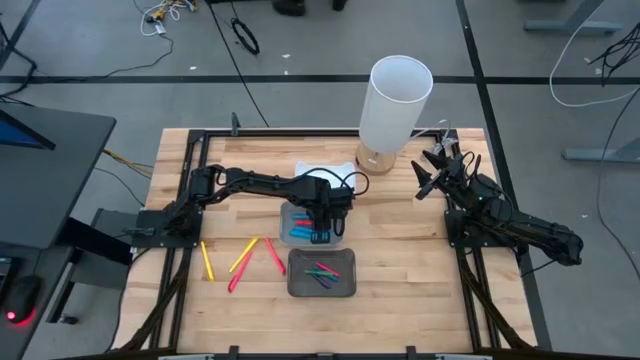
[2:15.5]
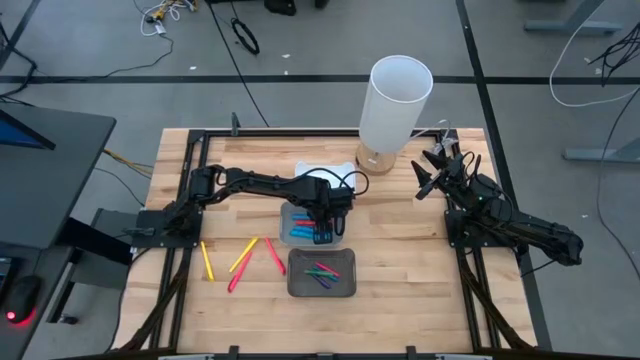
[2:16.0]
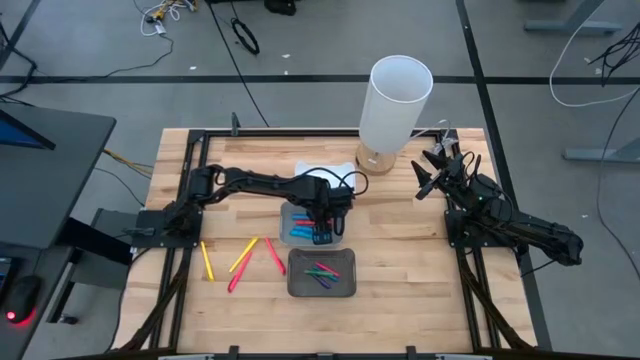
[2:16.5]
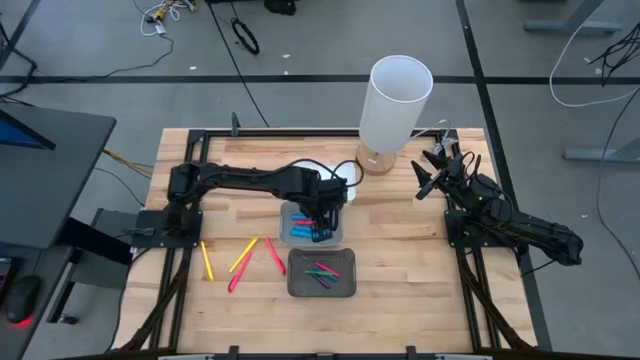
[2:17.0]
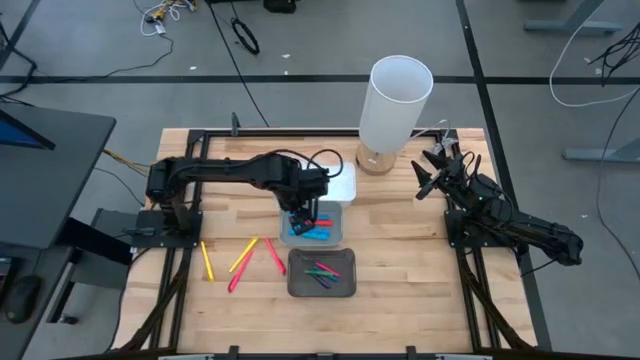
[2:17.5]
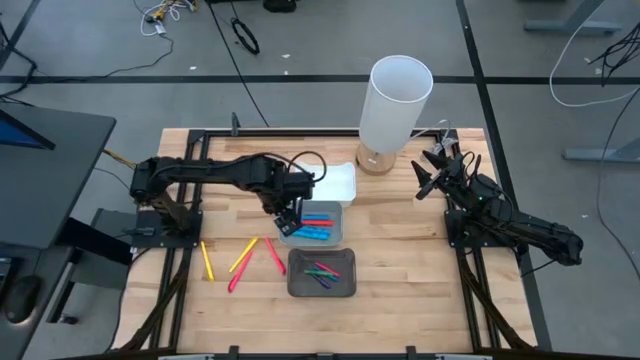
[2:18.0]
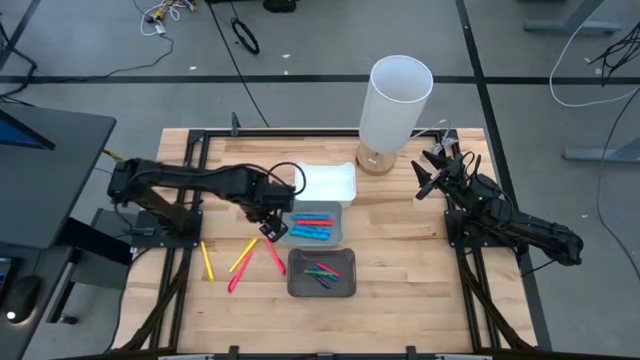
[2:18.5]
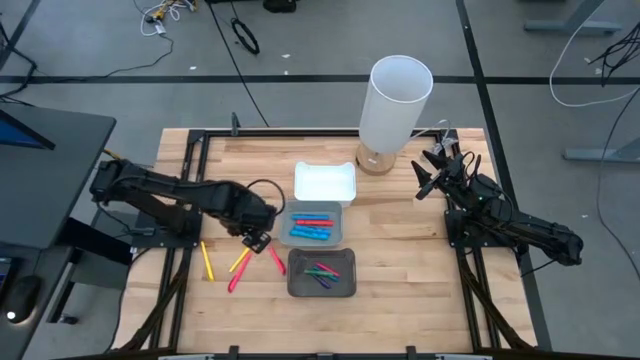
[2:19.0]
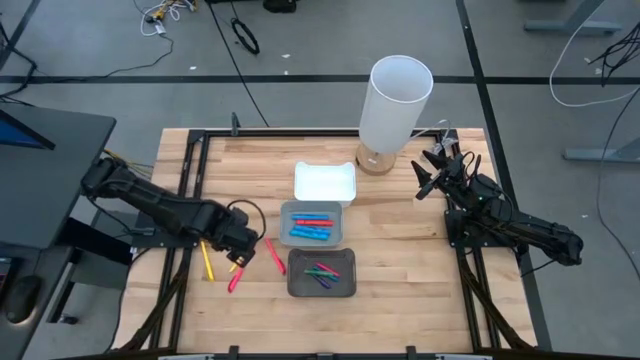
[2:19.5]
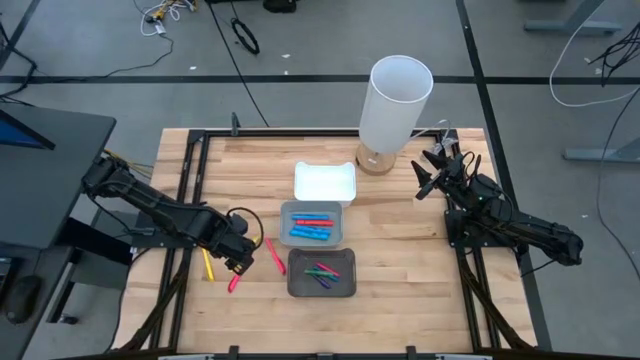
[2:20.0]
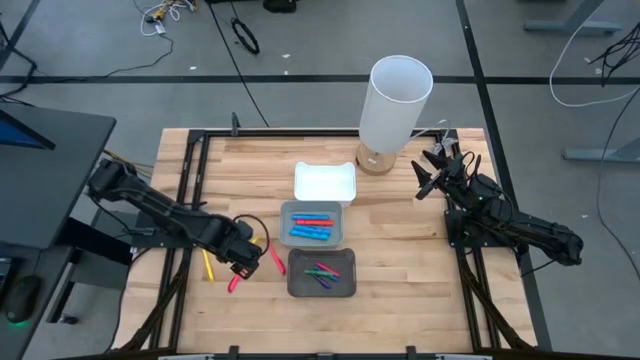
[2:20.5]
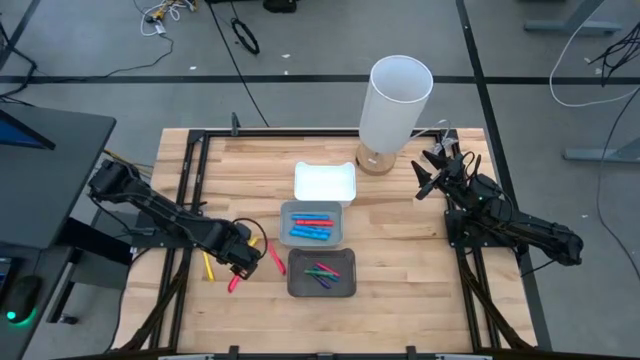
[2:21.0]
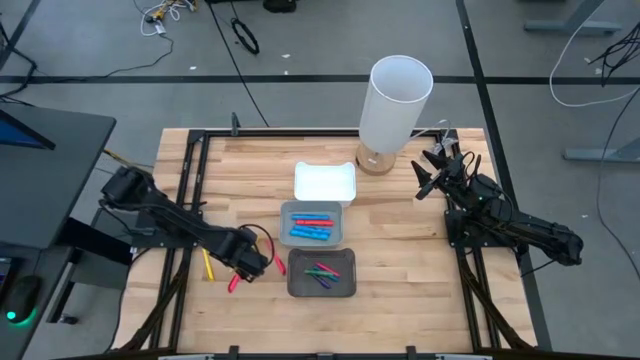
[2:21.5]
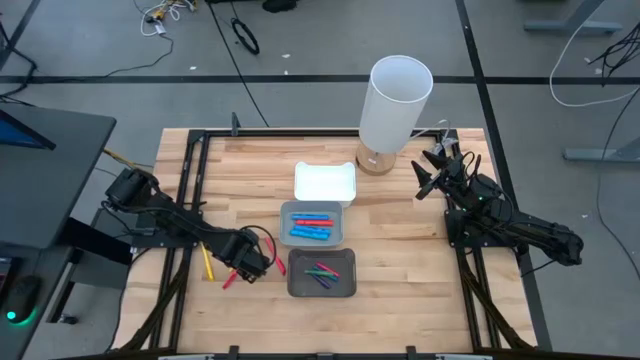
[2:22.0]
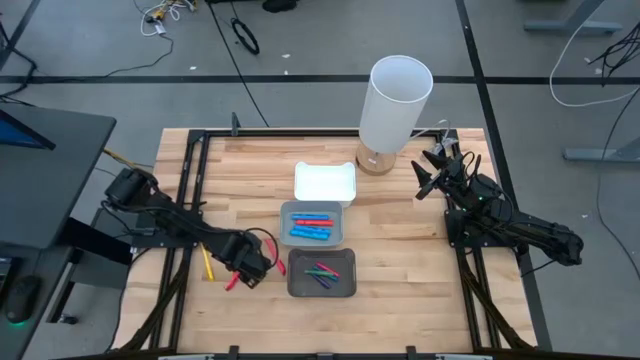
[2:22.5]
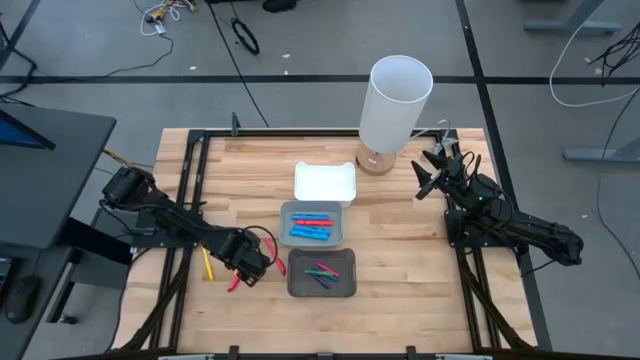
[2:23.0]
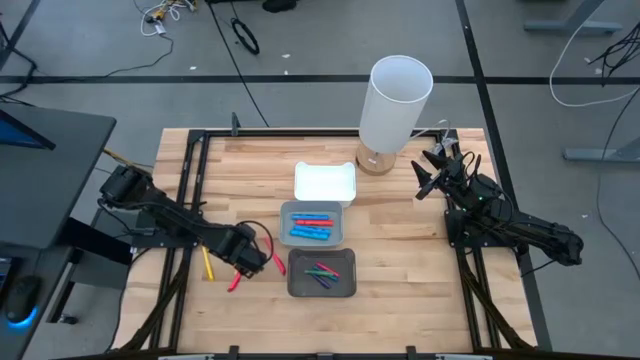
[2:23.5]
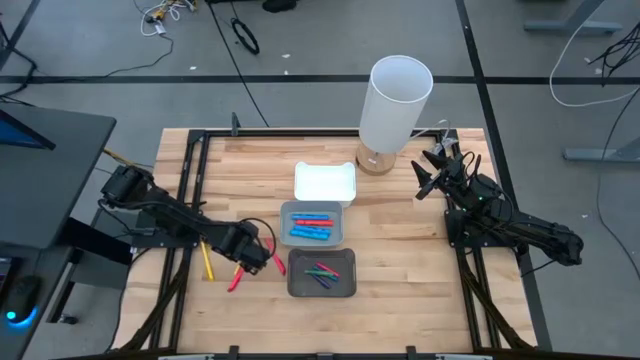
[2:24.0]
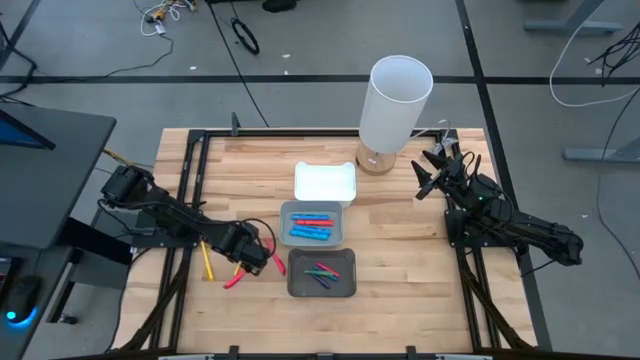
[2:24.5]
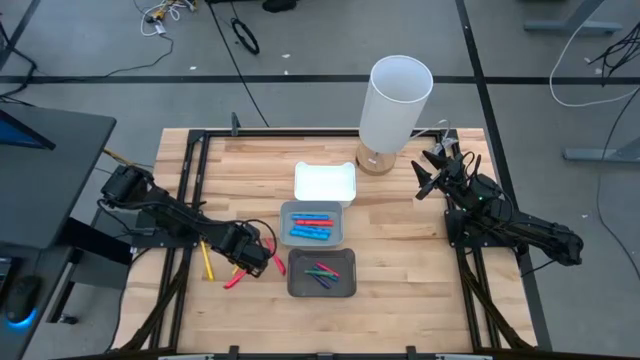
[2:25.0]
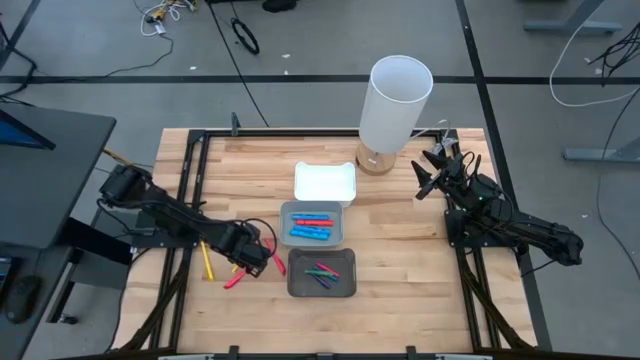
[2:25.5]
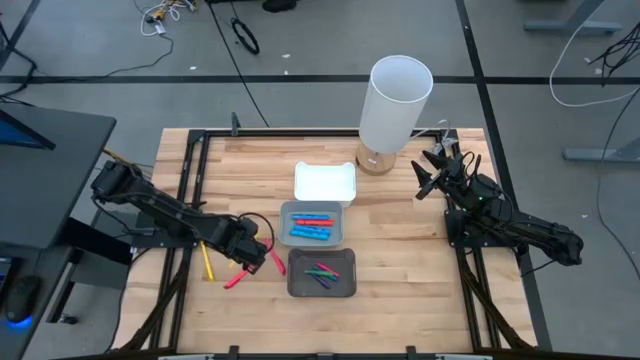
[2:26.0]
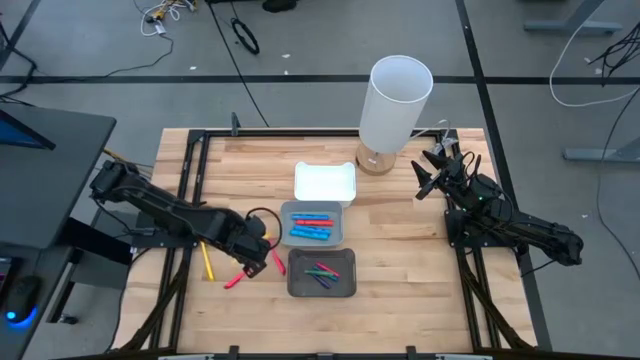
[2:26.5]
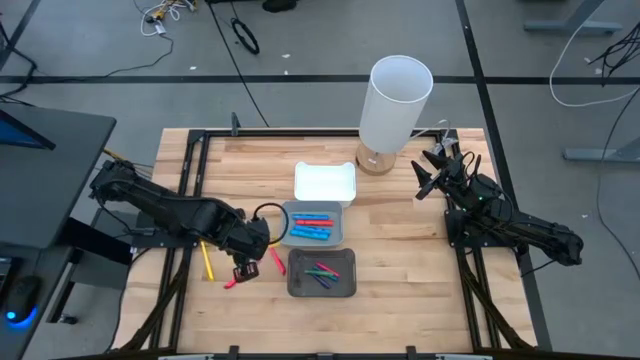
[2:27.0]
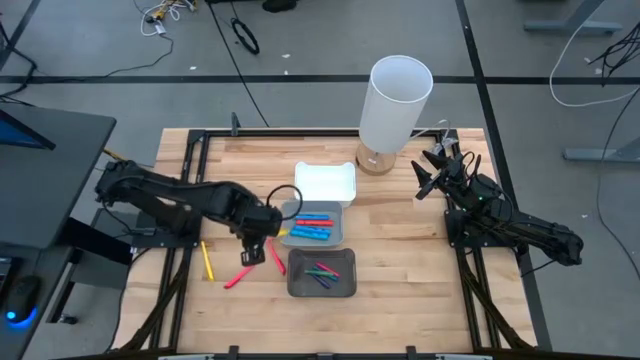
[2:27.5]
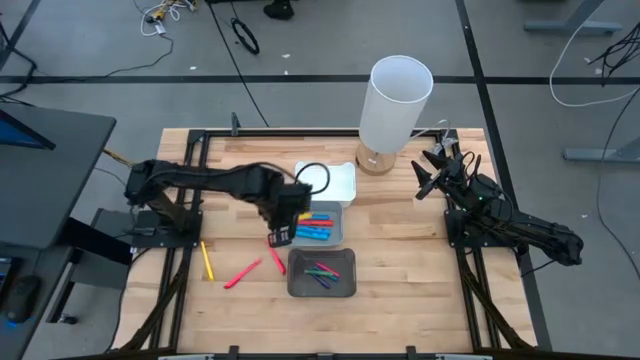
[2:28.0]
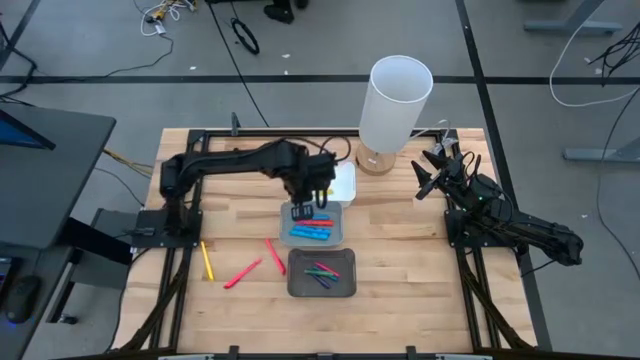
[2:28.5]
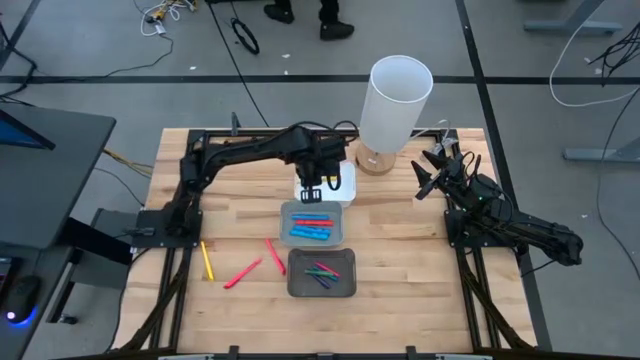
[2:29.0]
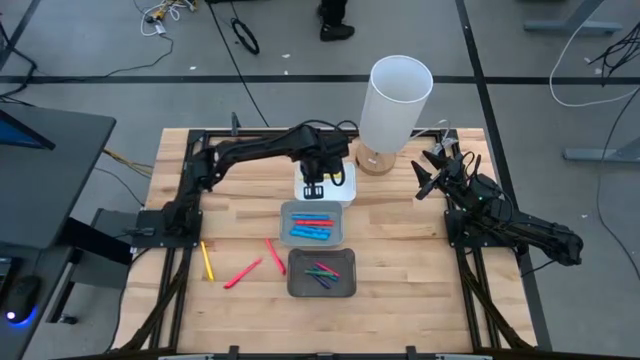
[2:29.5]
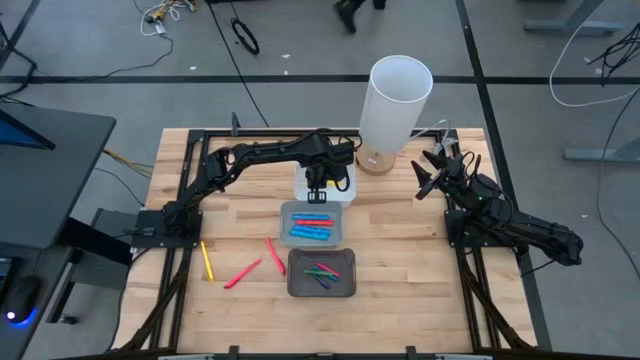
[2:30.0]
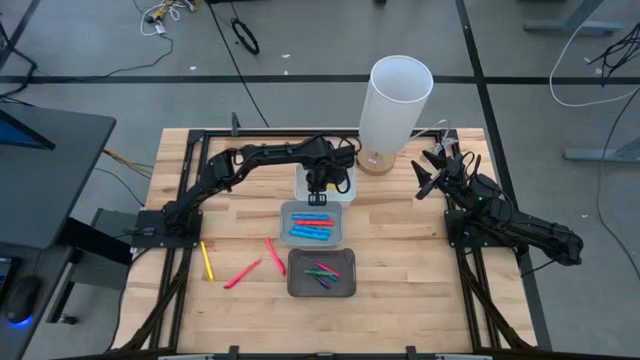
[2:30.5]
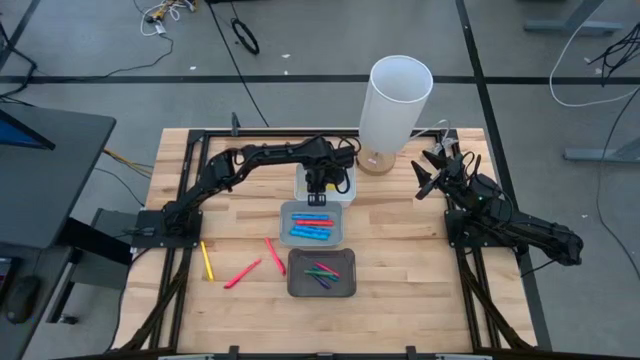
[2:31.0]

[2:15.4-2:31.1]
Task: Pick & Place Markers
Put the right yellow marker pen into the white bin

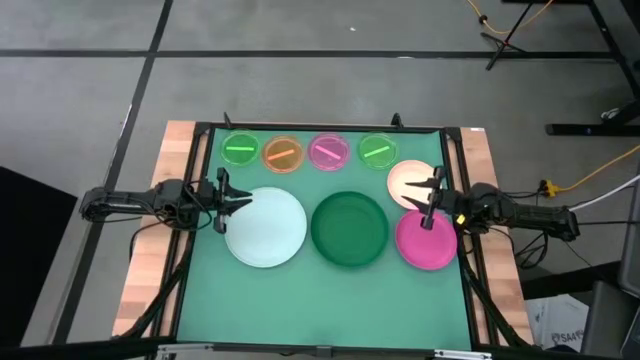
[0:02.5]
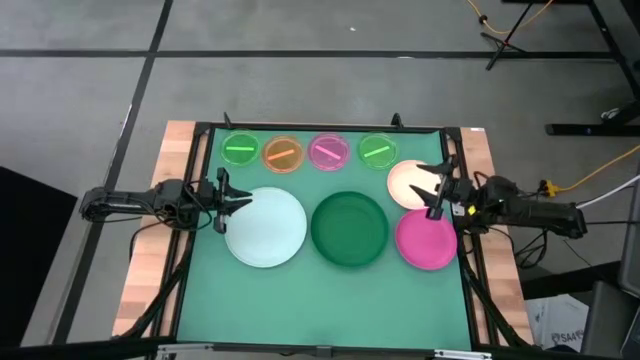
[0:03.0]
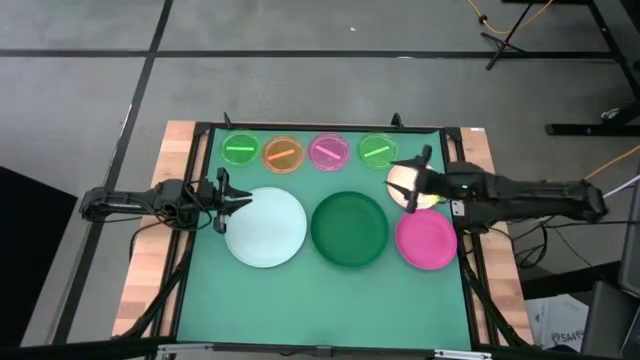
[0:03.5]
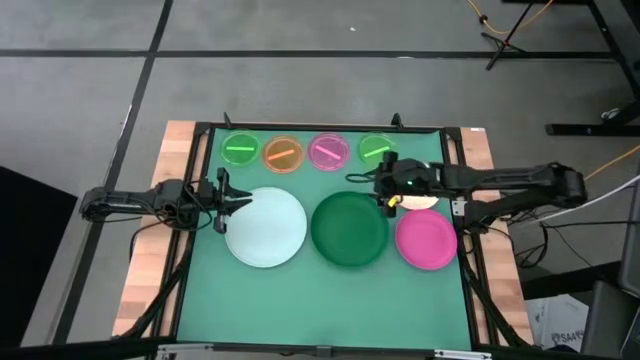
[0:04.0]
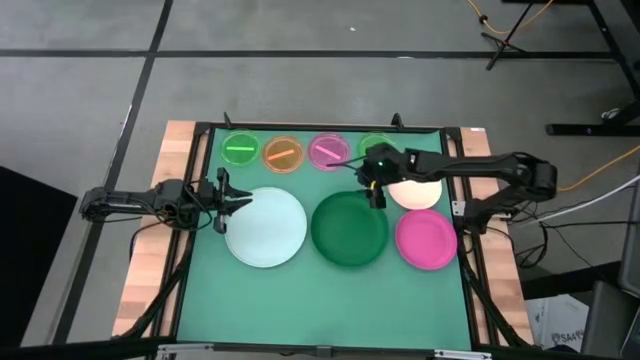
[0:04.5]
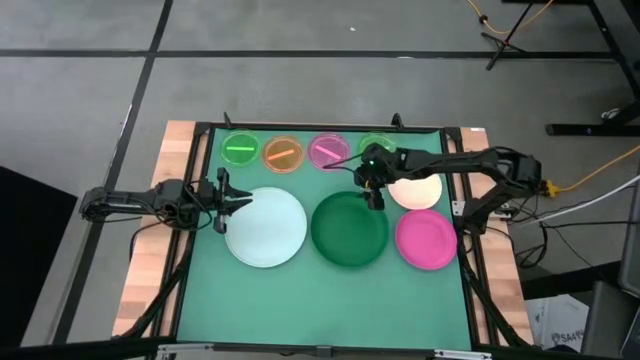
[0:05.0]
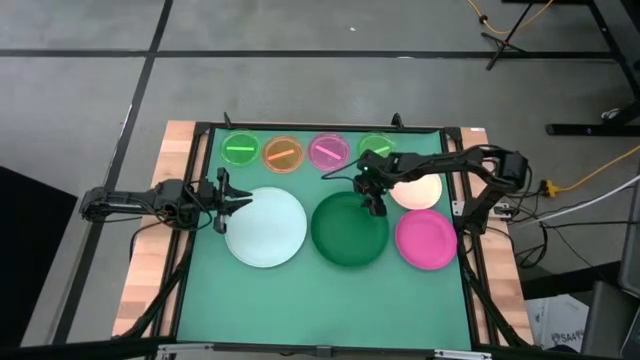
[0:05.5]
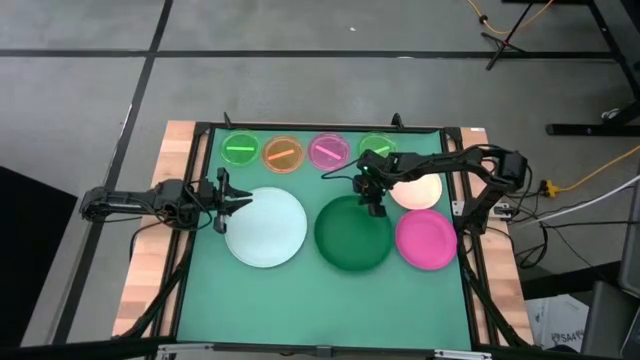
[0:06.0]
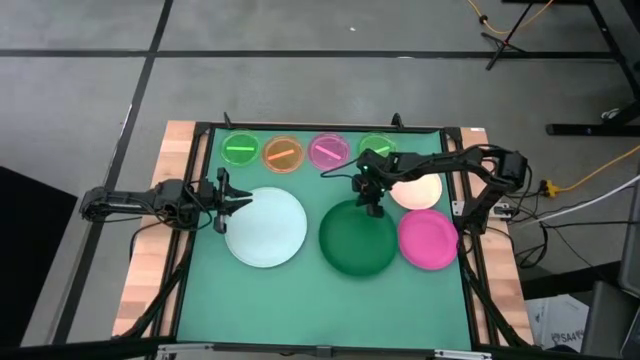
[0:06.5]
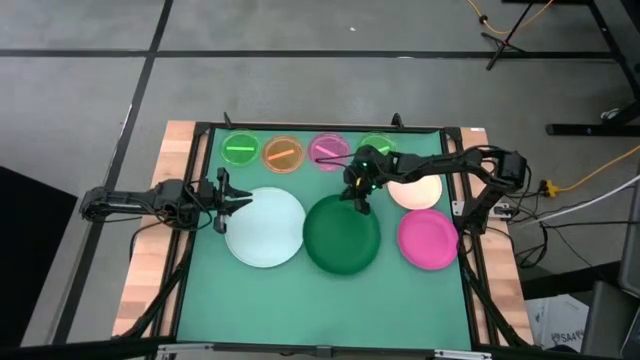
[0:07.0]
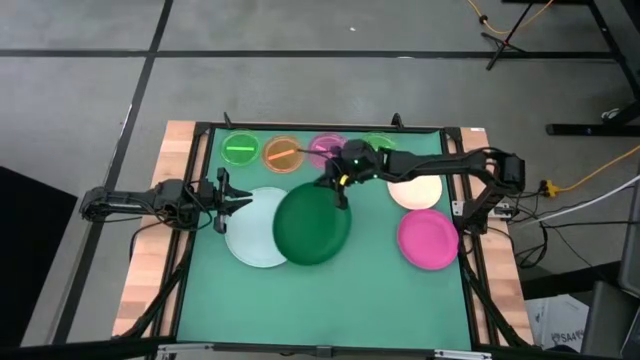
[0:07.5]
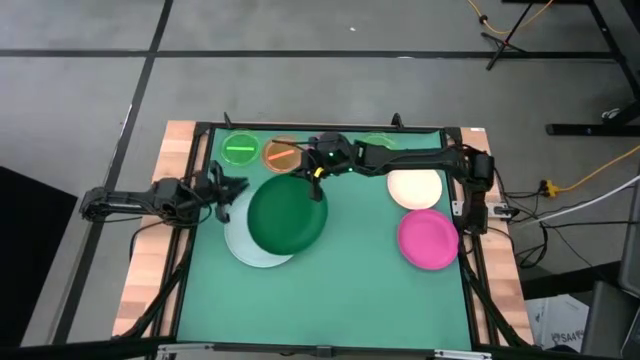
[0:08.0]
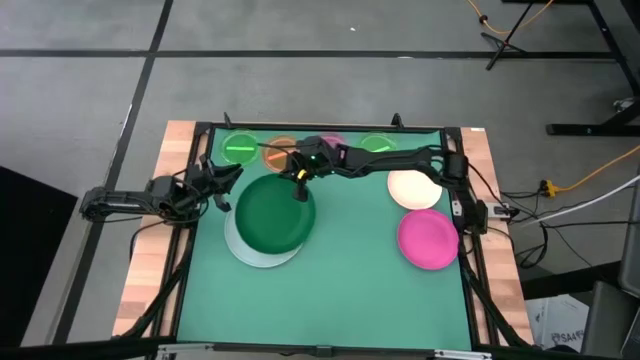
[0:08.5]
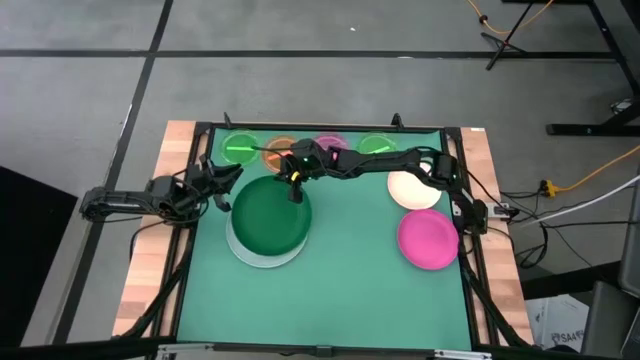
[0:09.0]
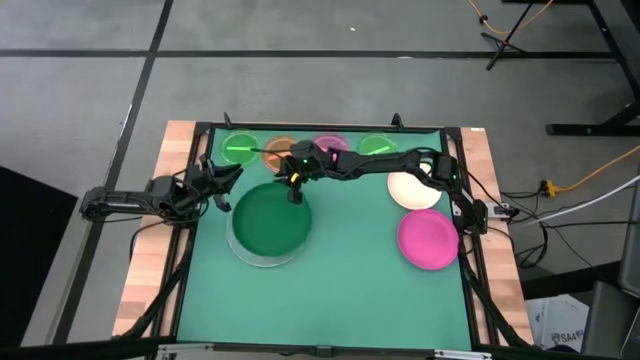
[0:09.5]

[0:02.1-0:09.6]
Task: Stack plastic plates
Stack the green plate on top of the the light blue plate
